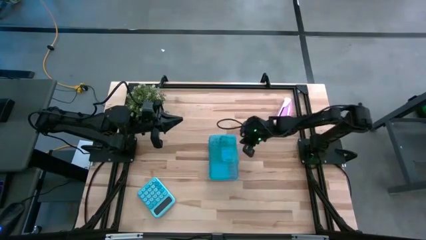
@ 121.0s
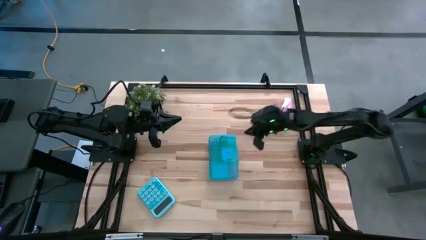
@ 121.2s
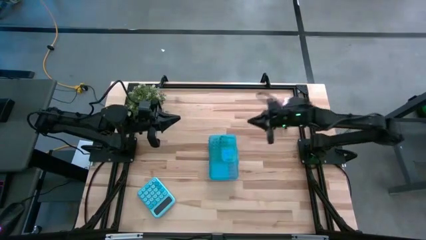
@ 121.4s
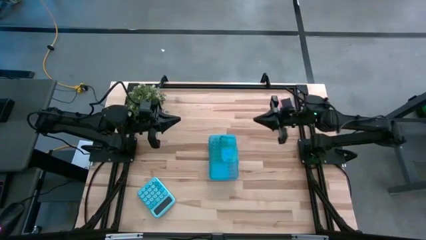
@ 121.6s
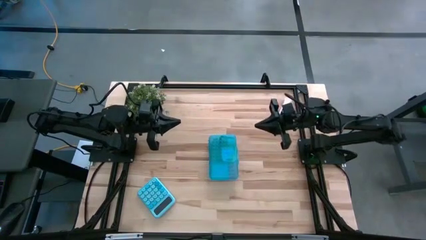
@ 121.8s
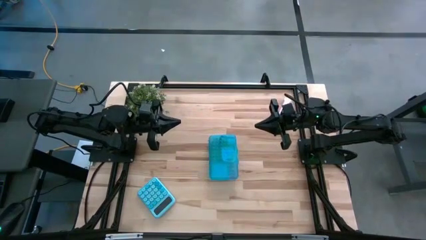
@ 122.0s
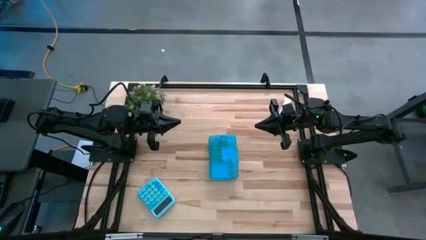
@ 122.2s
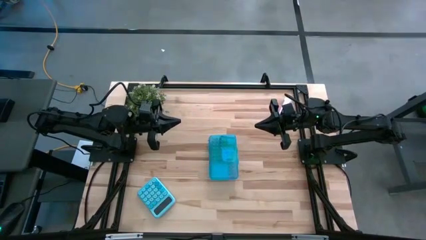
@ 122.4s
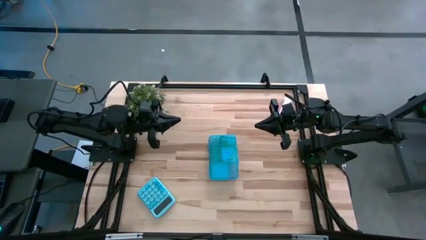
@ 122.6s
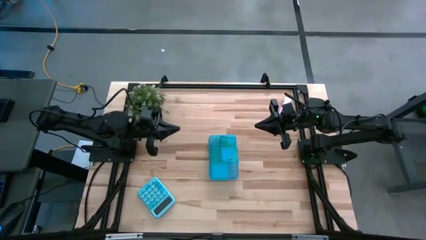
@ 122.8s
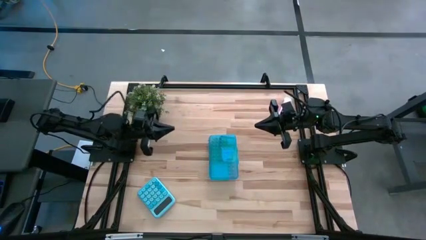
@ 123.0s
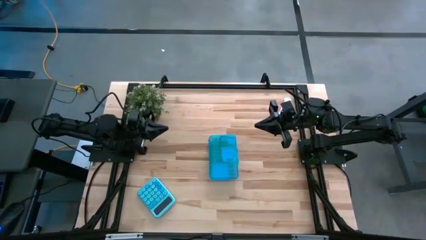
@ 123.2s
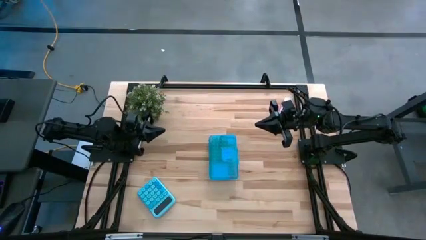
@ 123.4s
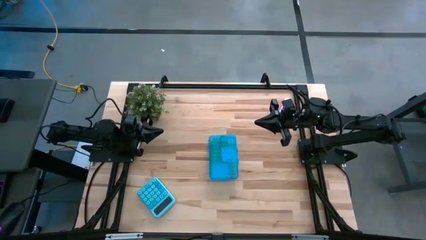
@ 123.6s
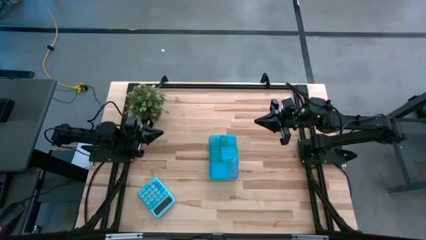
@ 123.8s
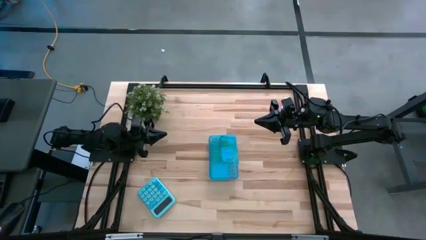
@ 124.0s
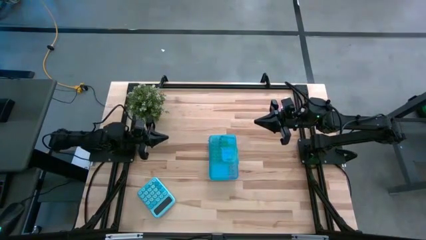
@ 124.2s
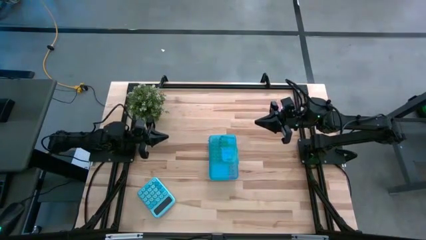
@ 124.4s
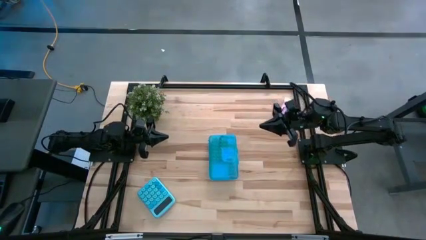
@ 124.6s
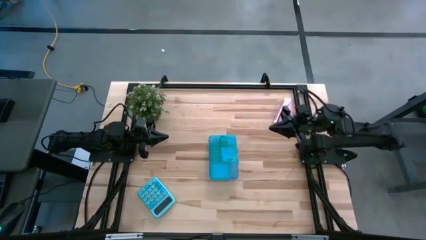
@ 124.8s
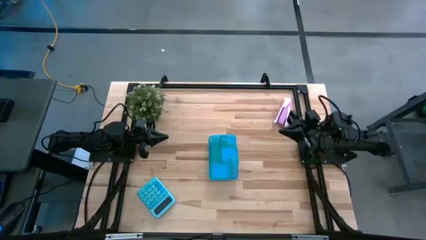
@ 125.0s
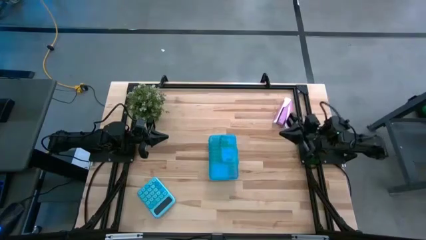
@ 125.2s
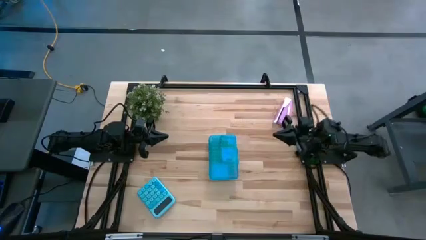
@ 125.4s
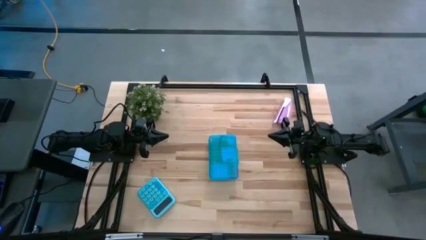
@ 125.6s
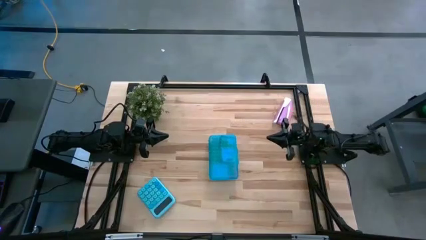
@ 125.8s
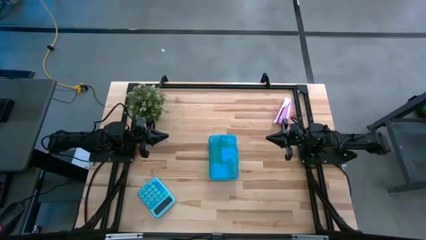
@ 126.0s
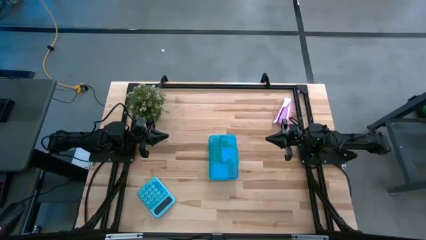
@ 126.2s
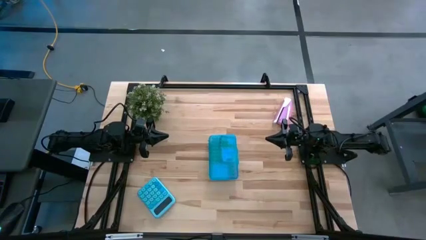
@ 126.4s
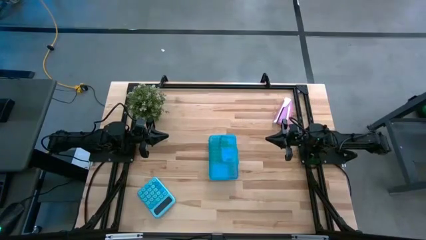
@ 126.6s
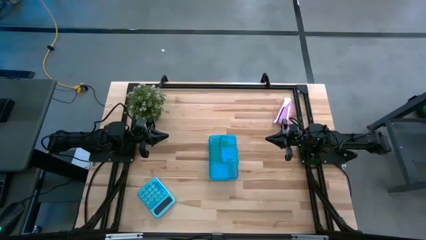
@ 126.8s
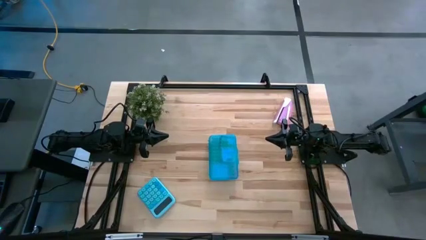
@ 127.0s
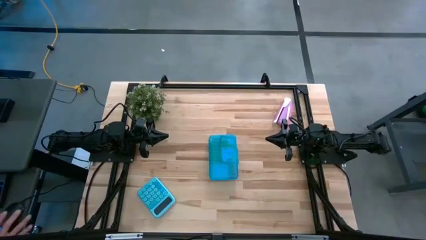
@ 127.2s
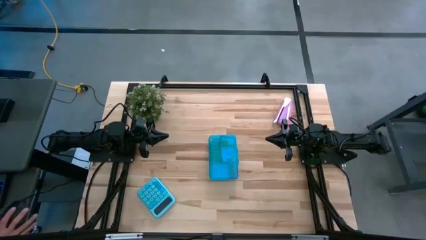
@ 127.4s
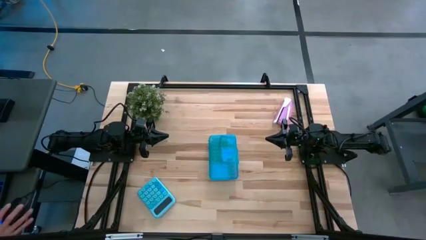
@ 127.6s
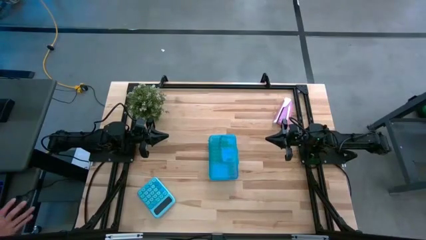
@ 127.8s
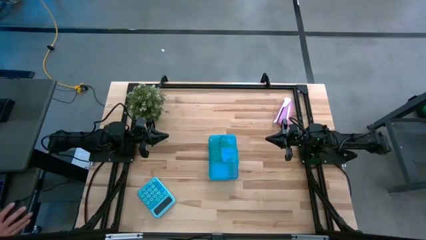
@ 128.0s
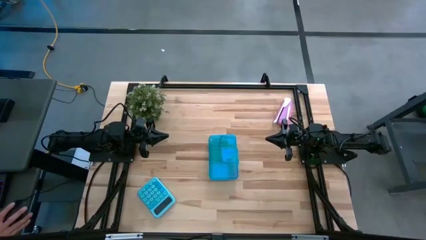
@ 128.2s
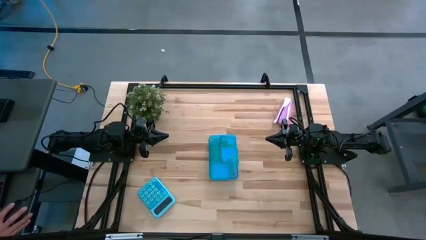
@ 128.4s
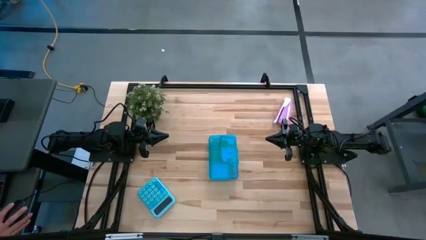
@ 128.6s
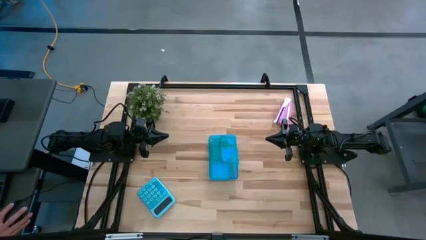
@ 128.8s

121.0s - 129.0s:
Task: Pack school essentials
Return to Home Position

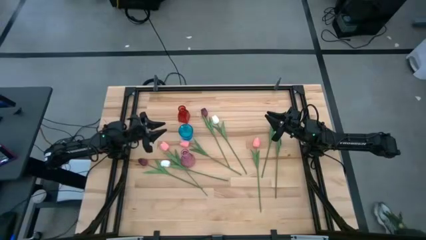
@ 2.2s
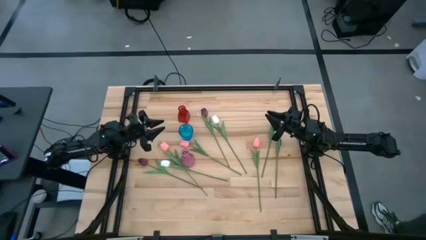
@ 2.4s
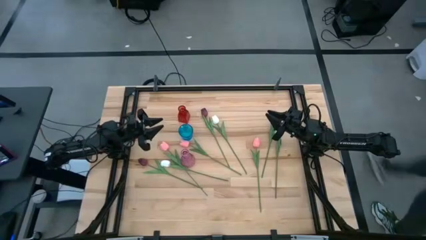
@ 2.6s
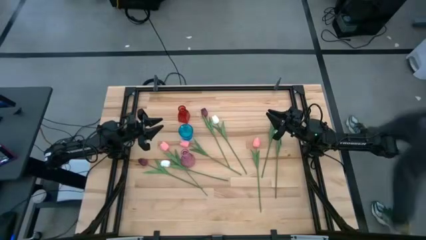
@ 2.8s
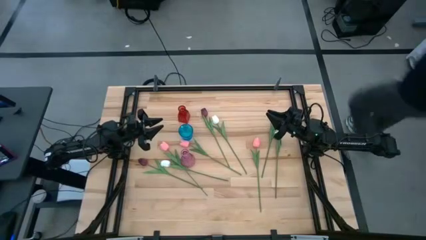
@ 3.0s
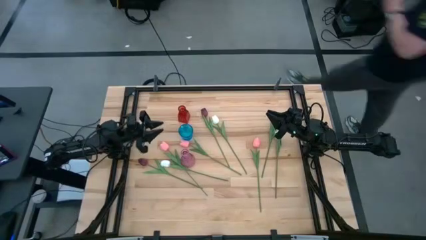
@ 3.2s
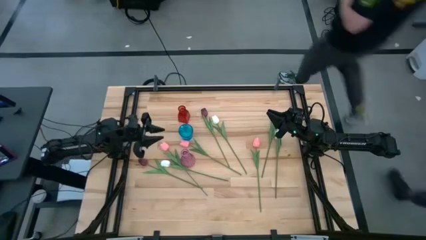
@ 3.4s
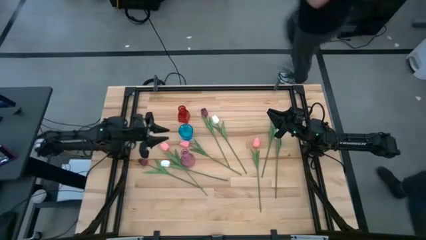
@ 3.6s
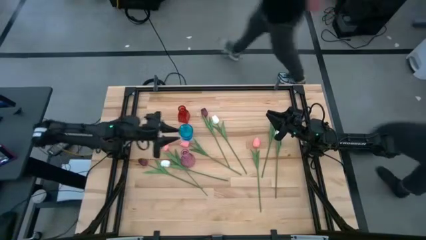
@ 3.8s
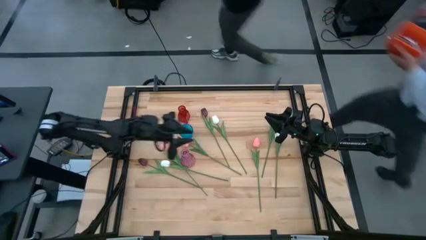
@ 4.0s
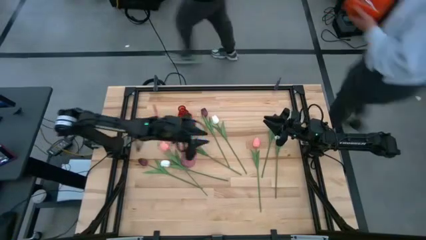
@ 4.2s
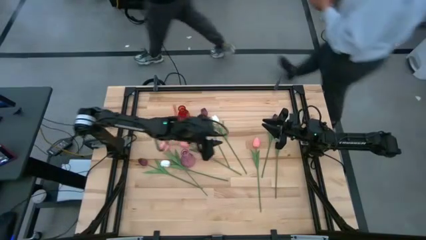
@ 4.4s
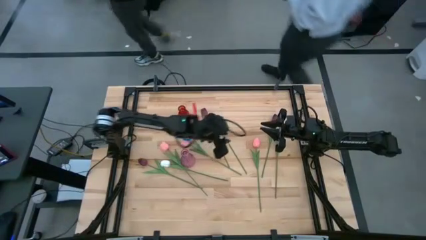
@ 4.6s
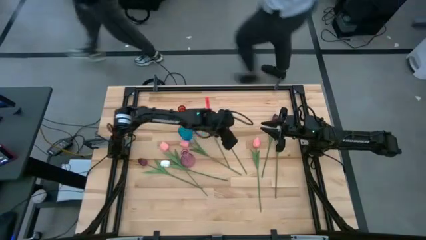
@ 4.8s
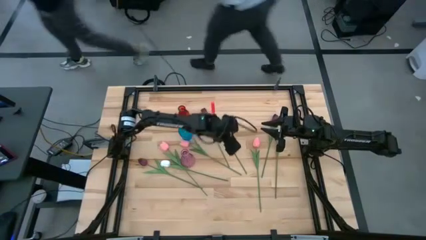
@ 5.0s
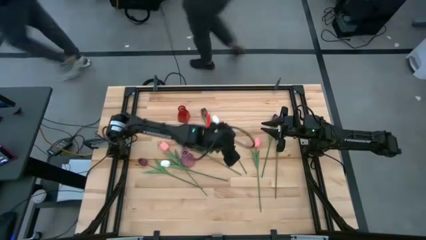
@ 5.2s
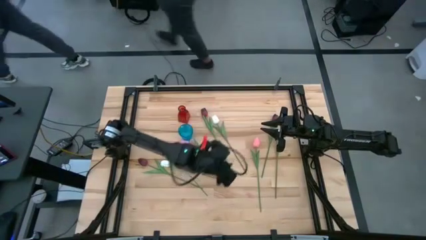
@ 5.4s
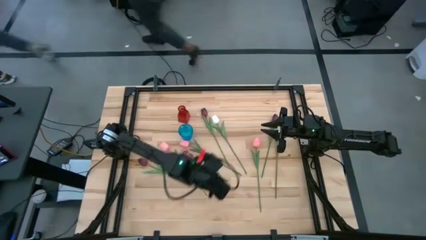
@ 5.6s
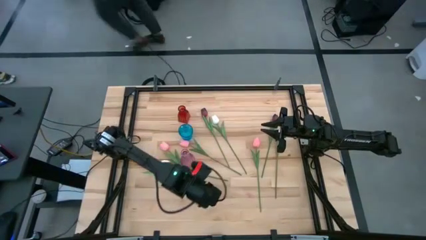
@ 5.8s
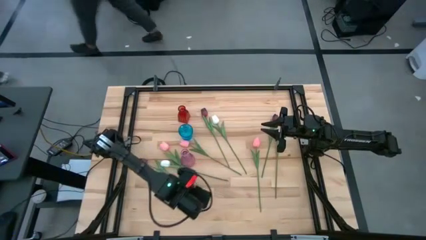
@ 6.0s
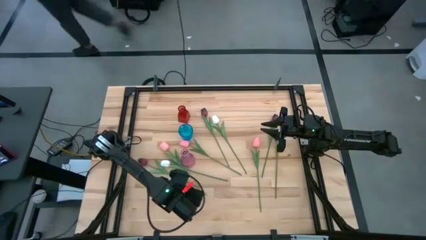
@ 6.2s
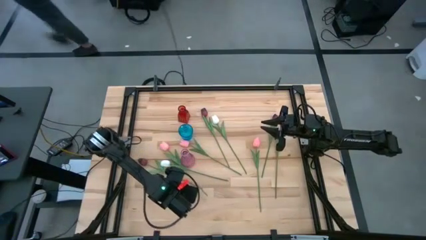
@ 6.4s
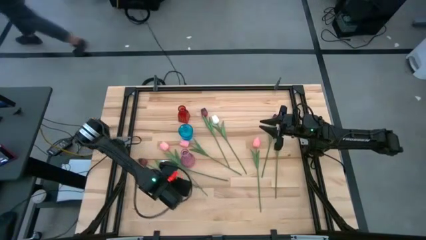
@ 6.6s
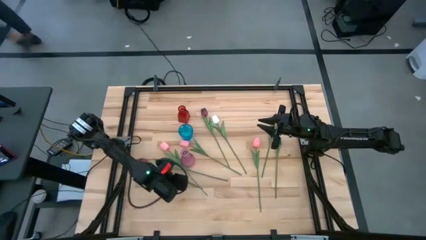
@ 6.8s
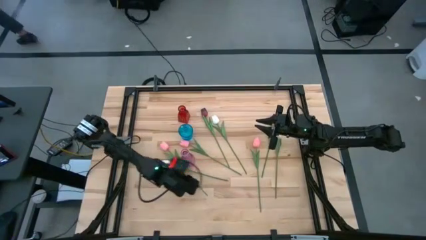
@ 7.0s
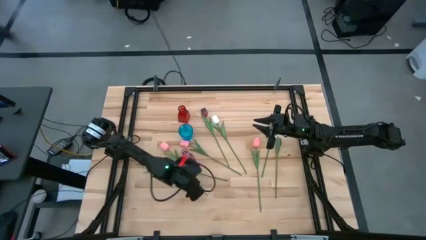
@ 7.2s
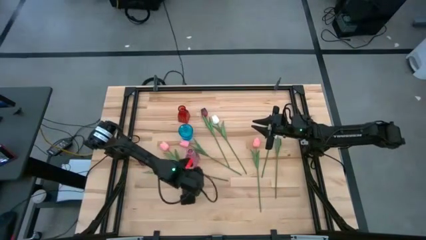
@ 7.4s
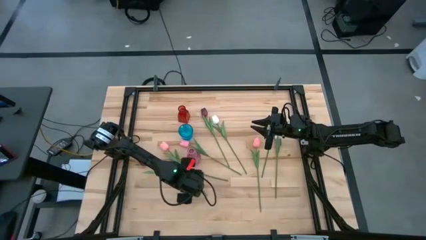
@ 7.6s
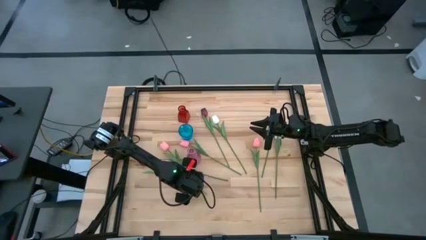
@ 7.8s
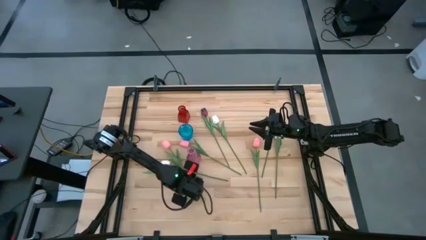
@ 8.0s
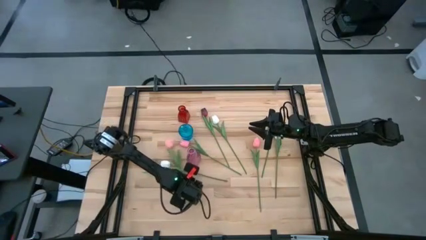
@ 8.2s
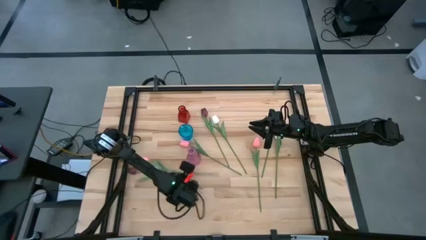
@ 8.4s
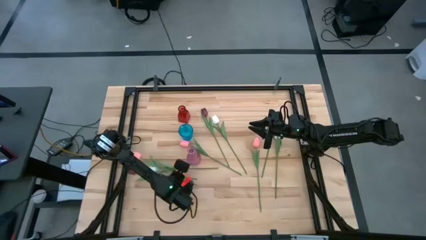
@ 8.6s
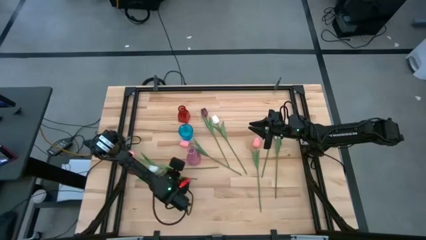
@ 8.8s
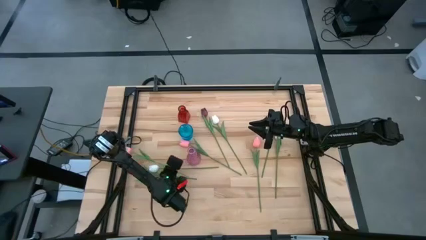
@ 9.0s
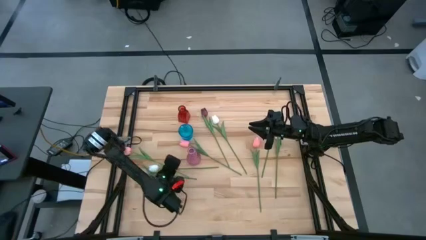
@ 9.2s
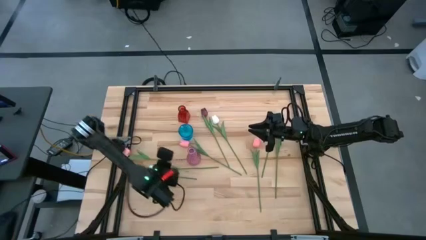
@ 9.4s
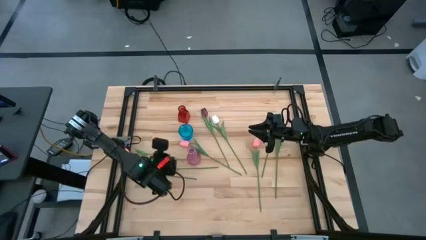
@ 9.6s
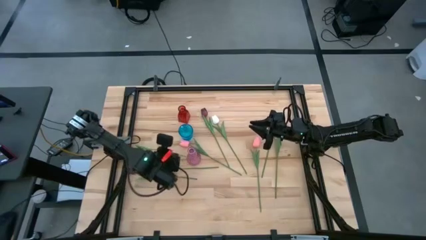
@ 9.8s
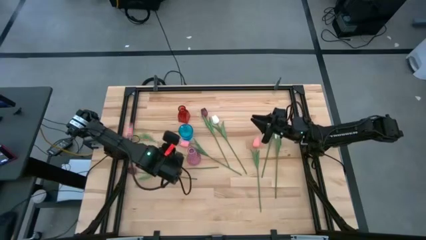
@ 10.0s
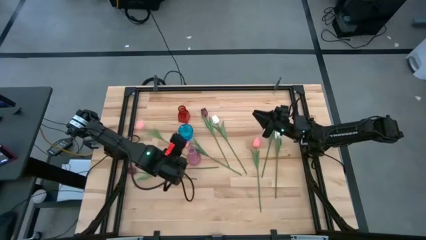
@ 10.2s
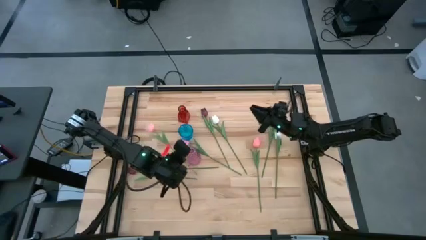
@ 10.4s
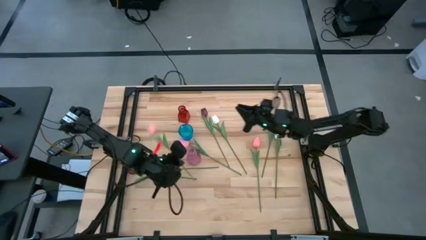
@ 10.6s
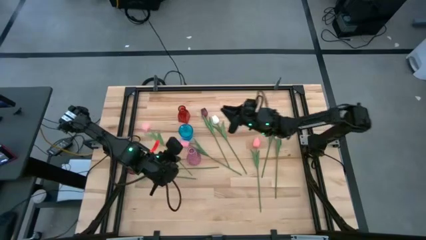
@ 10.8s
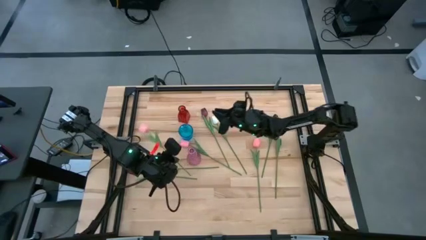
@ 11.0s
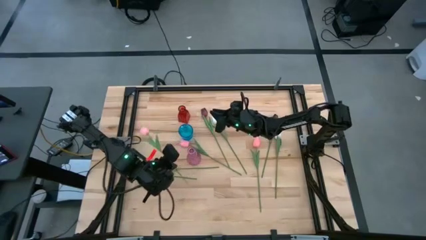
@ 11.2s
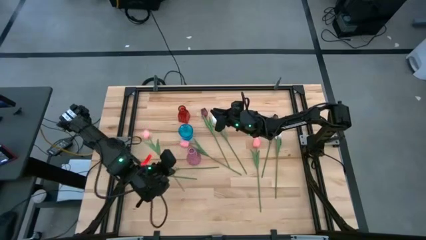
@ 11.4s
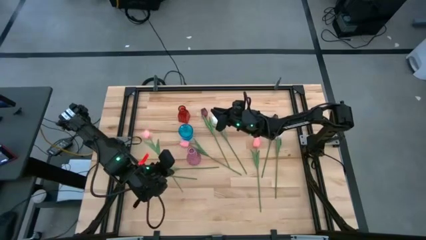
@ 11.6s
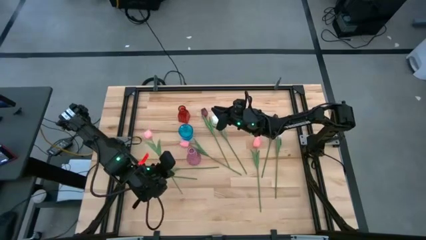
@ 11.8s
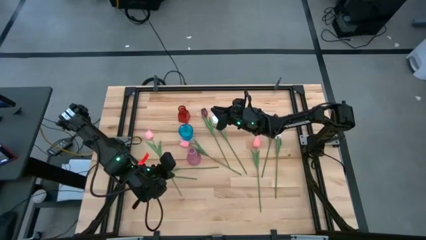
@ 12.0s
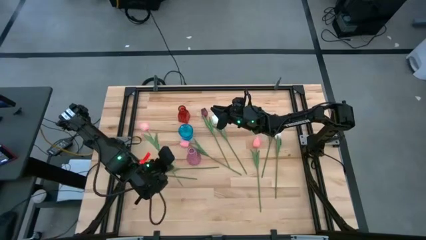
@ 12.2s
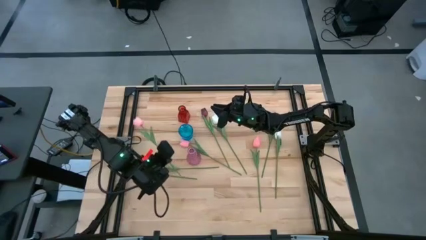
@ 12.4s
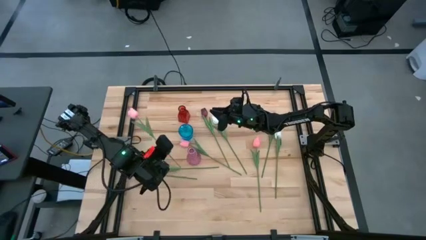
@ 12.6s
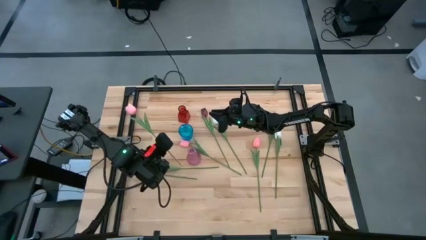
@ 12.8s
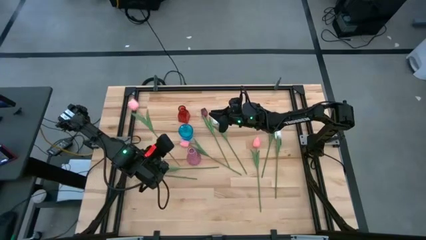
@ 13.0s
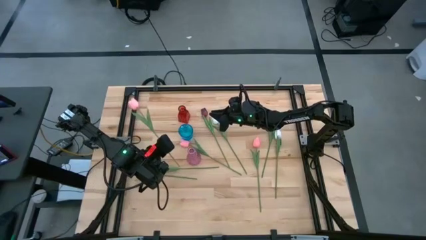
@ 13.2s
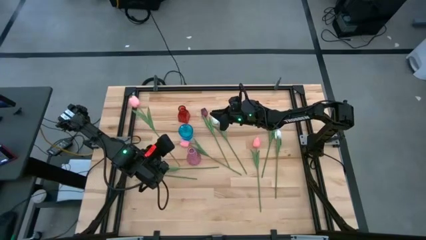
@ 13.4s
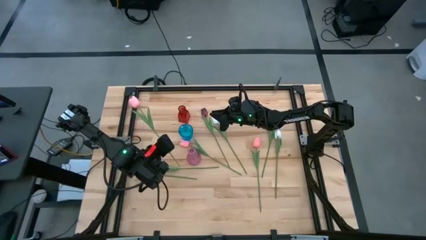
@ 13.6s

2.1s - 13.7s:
Task: Sort flowers into vase by color
Put the left pink flower into the blue vase
